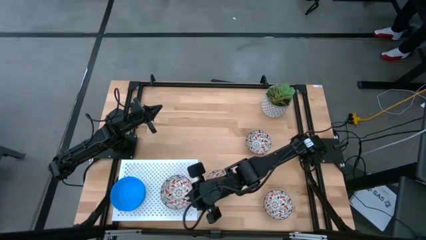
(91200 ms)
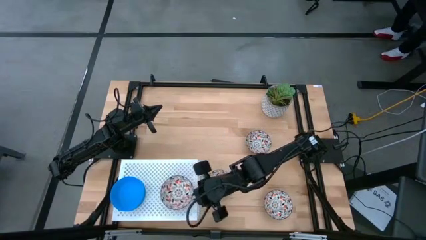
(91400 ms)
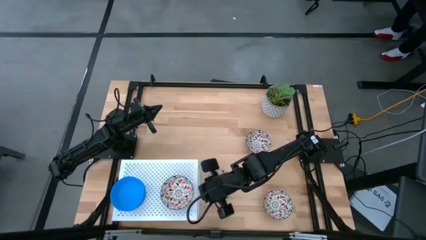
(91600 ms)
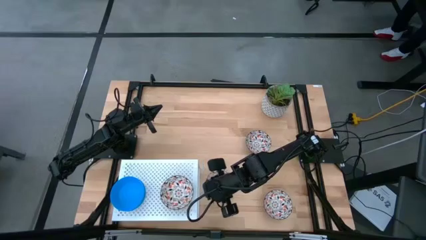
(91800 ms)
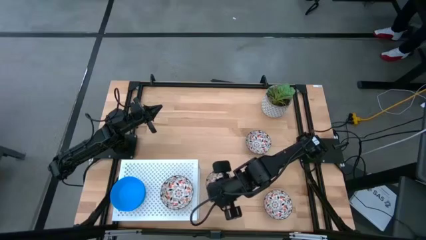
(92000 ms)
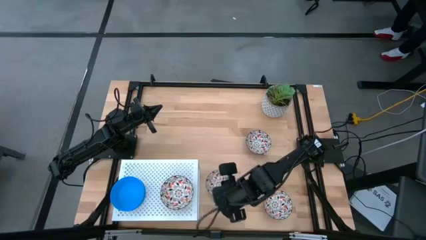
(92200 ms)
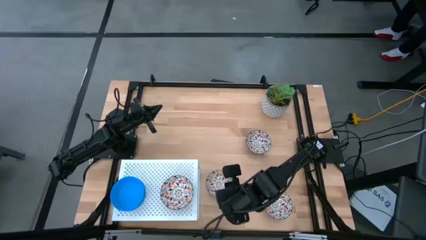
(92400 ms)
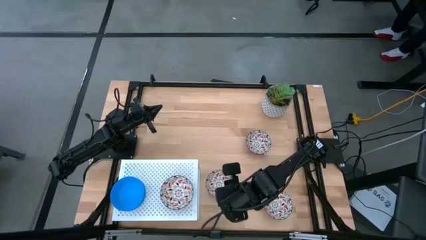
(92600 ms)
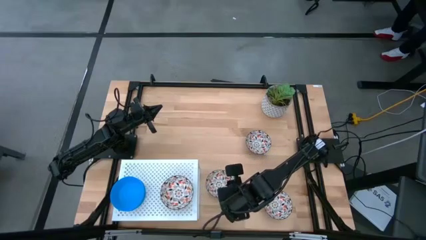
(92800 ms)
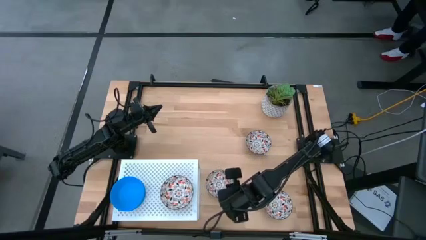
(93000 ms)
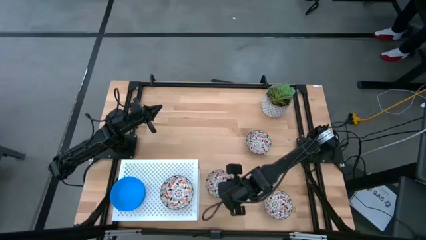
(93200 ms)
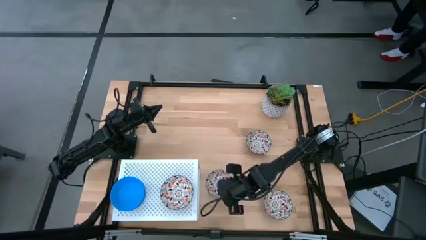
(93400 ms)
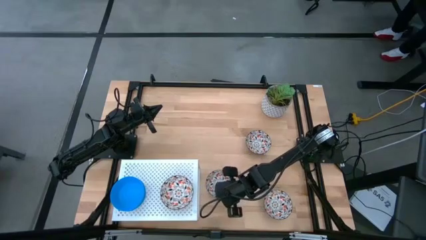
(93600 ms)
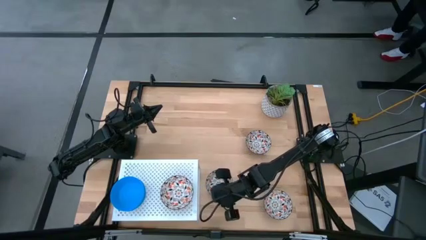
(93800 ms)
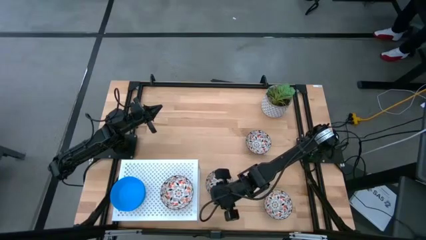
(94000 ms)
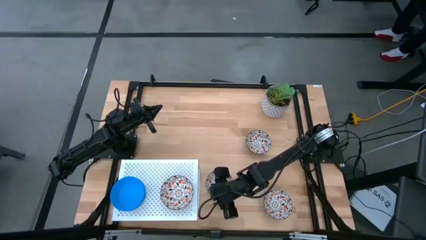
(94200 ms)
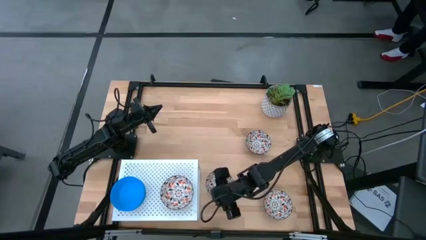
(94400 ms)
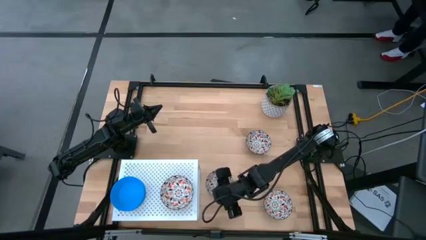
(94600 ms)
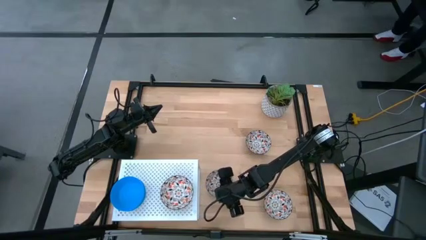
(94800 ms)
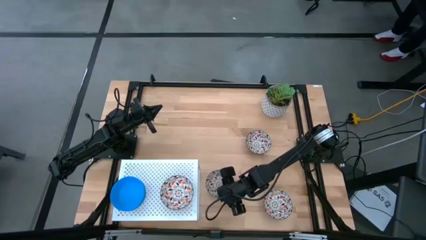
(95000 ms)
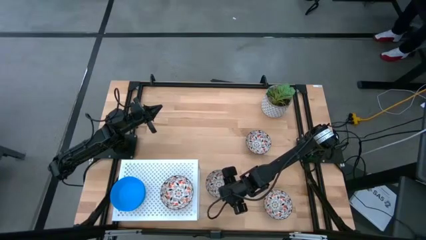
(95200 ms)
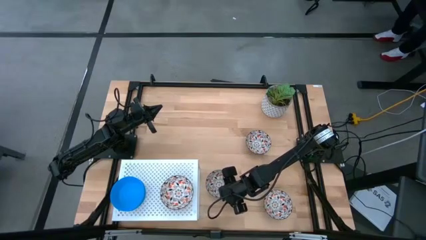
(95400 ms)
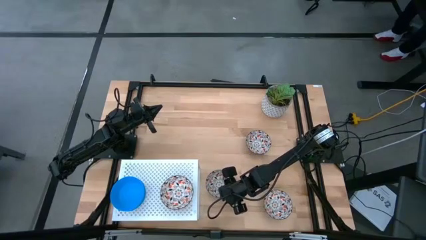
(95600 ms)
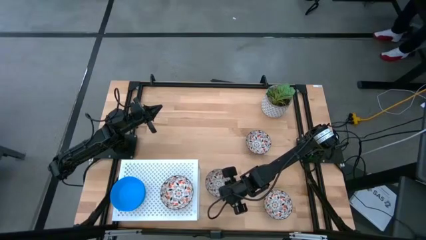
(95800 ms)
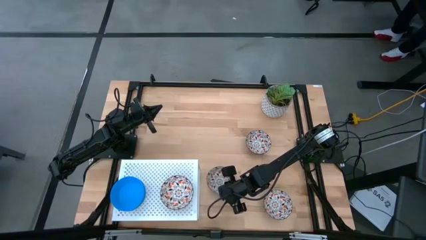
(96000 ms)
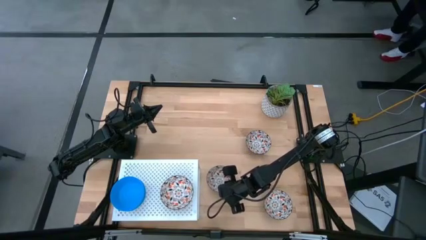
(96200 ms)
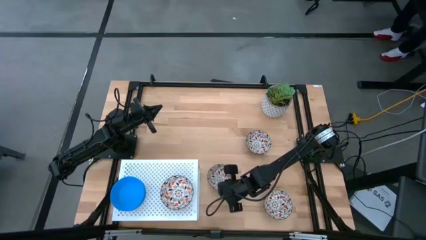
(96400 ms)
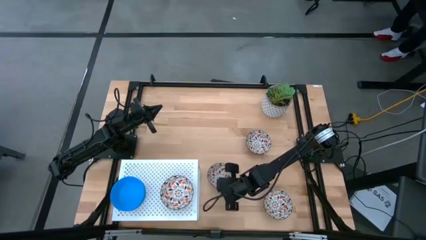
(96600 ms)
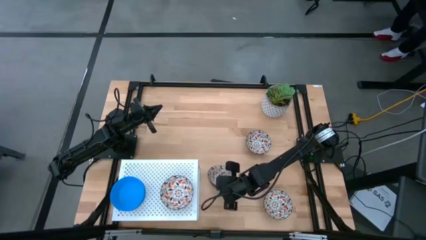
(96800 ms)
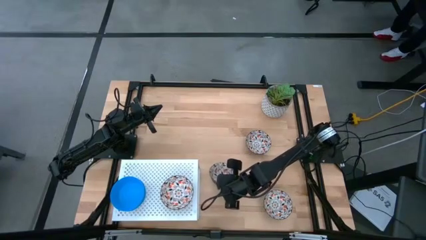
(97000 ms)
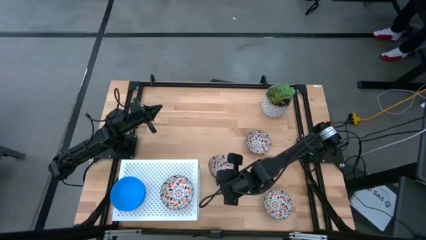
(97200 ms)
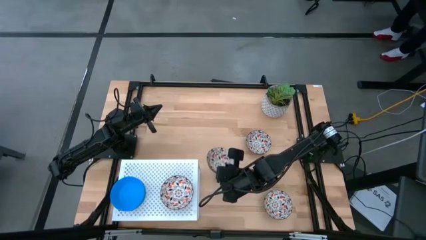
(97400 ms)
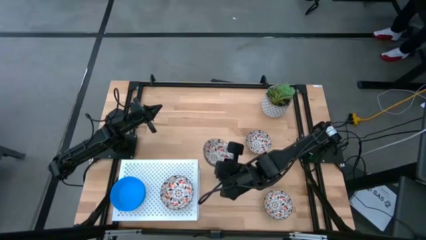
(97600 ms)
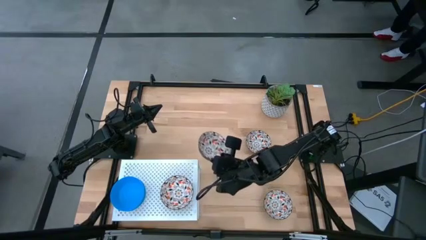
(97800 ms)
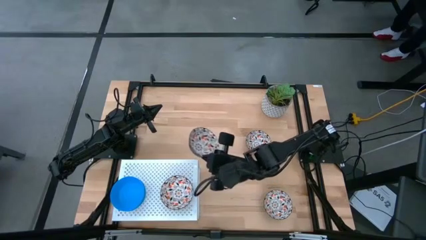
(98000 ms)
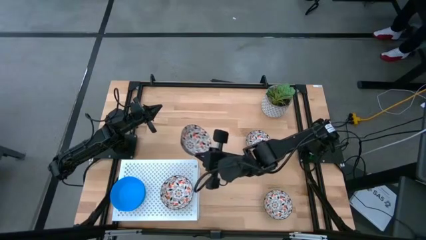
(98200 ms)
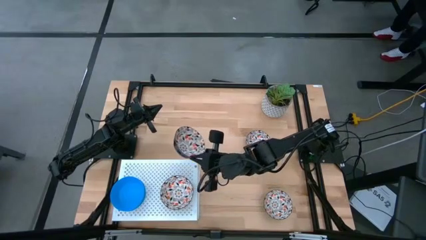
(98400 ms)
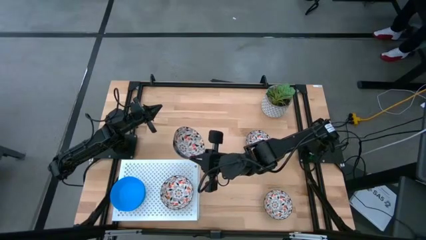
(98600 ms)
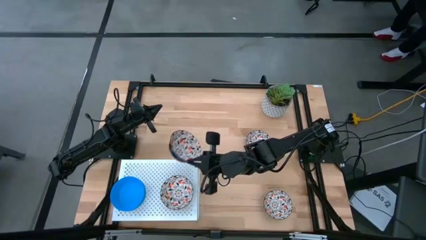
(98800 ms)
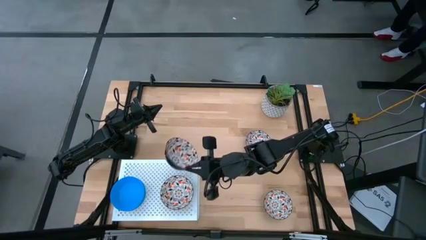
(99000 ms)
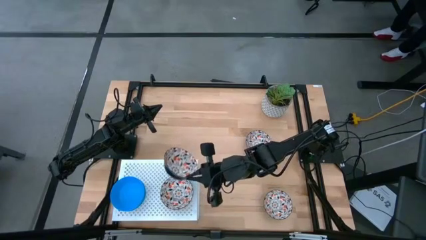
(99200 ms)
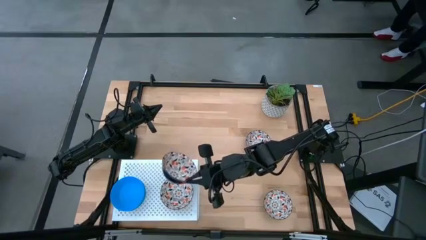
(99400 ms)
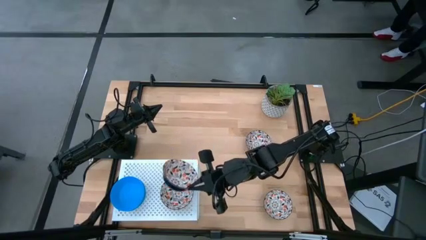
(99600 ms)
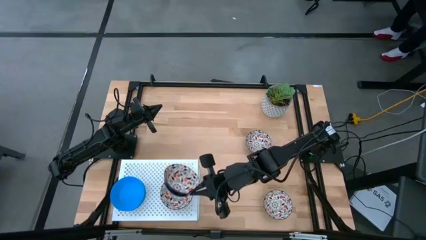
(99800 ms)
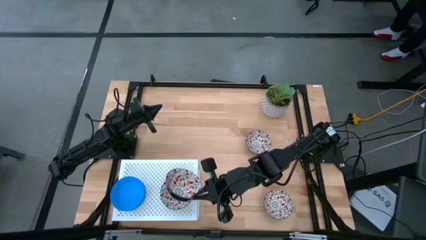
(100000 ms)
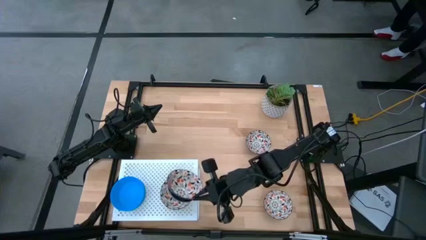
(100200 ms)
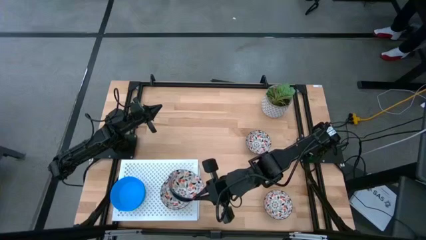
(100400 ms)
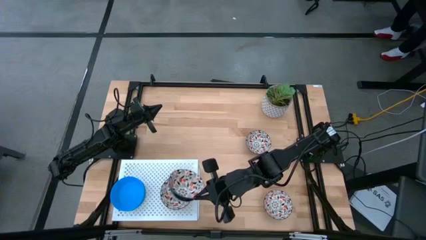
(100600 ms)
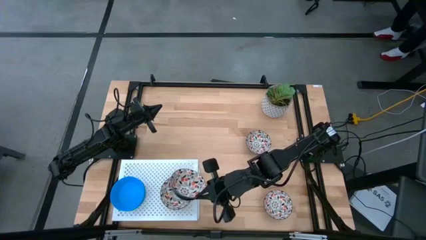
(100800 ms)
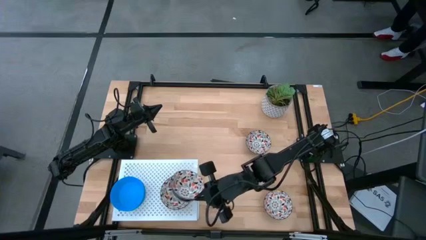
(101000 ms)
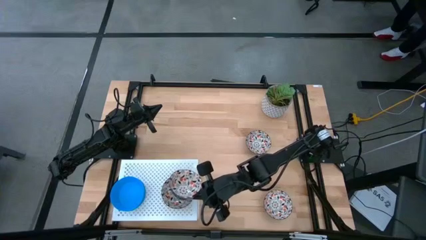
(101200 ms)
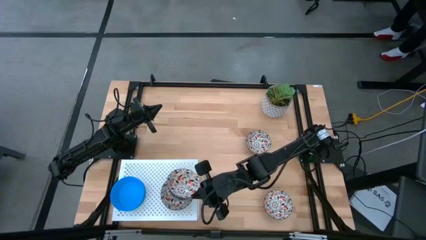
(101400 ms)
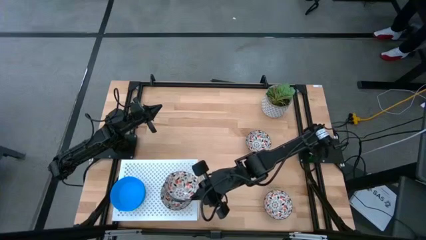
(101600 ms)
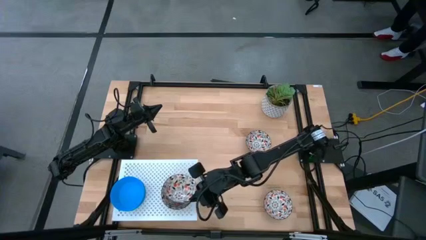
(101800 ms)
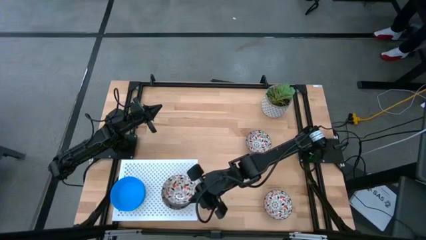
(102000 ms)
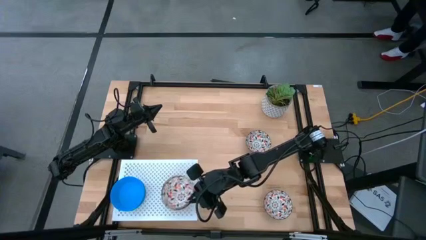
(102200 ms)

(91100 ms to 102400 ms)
Task: Pick & Place Mini bowls
Stack the patterned bowl on the patterned bowl on the shelf

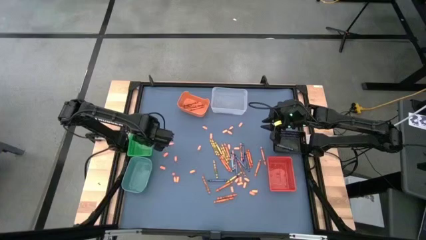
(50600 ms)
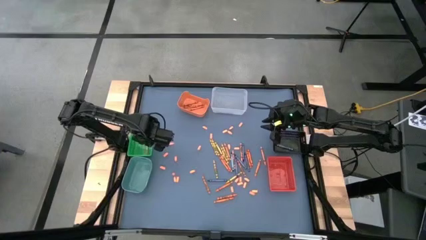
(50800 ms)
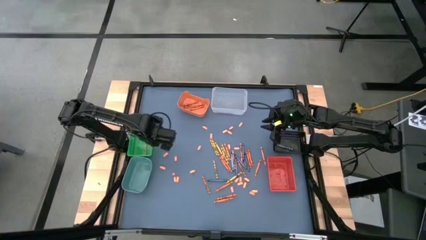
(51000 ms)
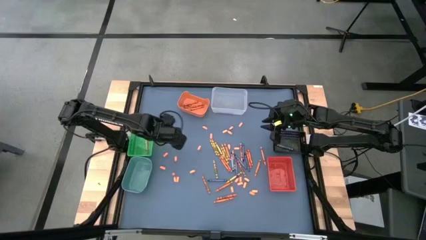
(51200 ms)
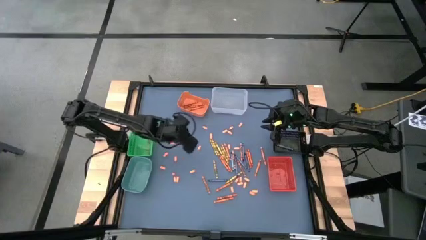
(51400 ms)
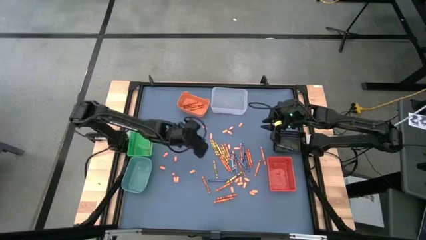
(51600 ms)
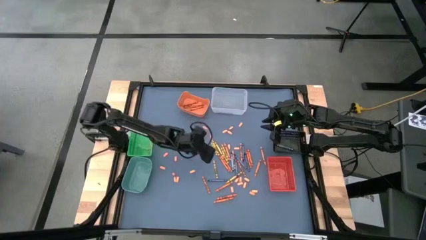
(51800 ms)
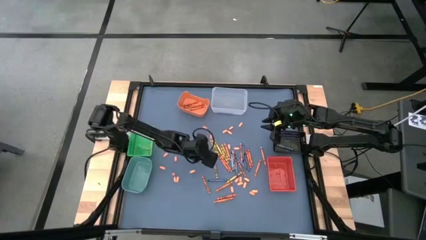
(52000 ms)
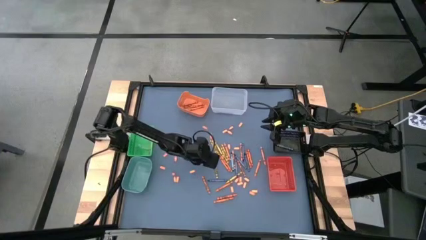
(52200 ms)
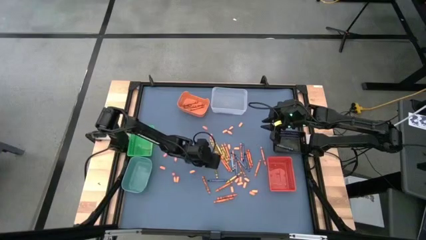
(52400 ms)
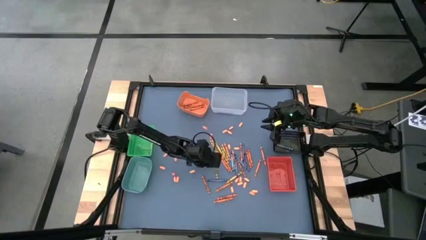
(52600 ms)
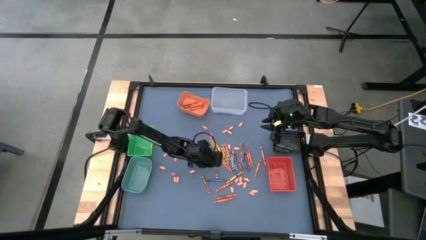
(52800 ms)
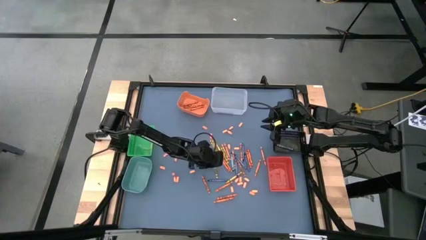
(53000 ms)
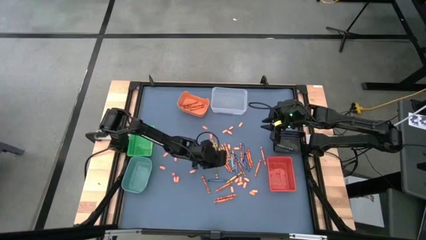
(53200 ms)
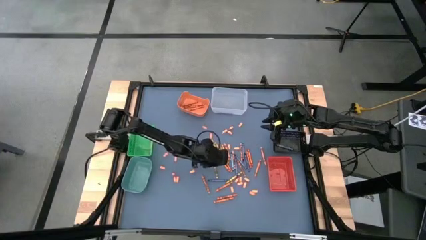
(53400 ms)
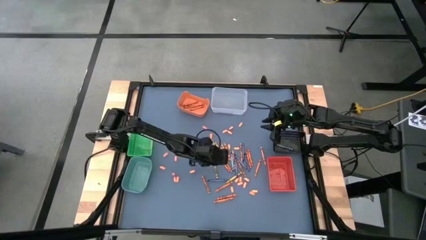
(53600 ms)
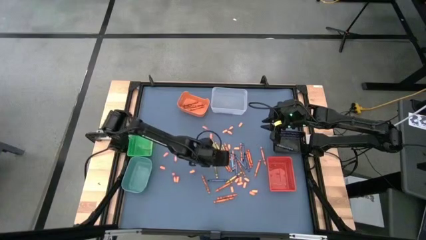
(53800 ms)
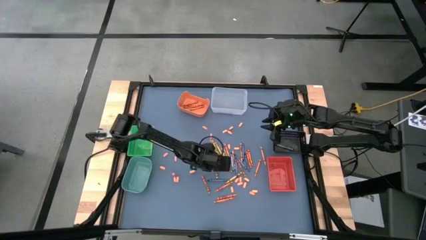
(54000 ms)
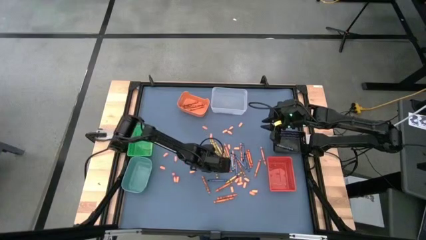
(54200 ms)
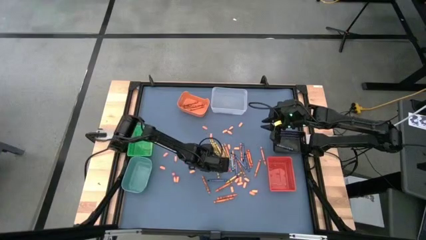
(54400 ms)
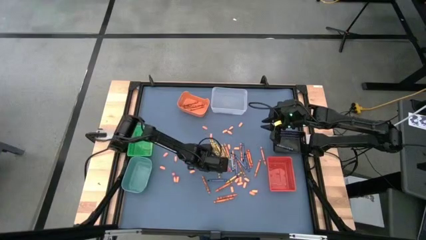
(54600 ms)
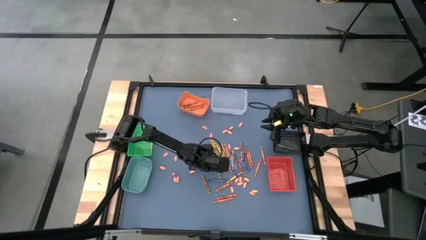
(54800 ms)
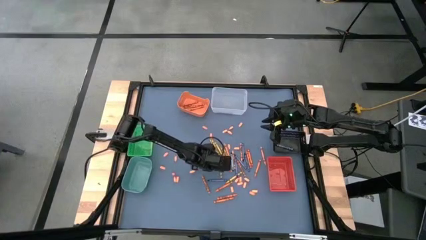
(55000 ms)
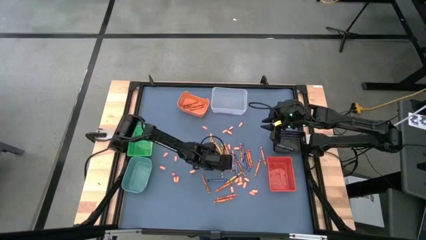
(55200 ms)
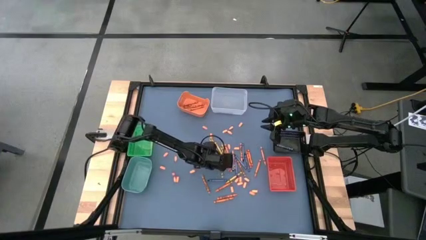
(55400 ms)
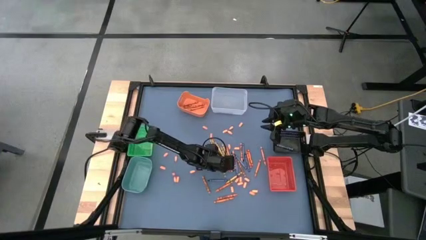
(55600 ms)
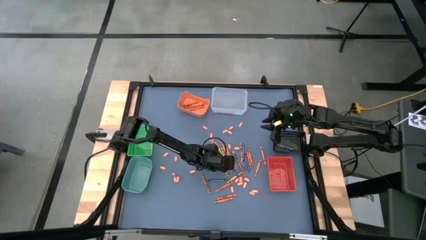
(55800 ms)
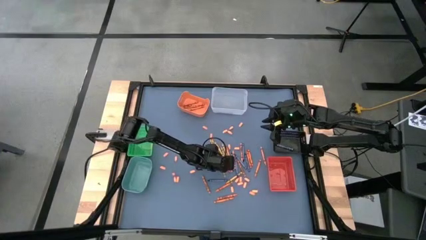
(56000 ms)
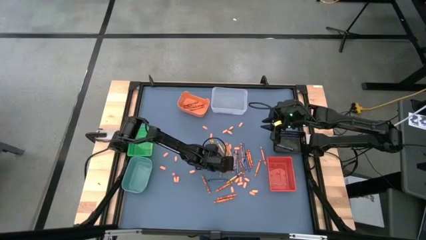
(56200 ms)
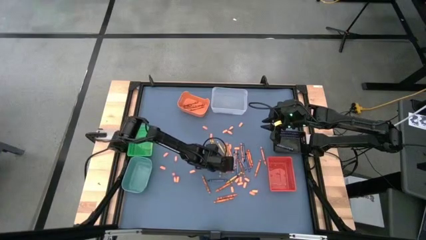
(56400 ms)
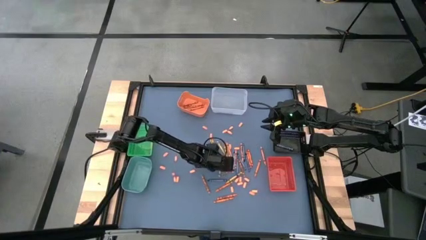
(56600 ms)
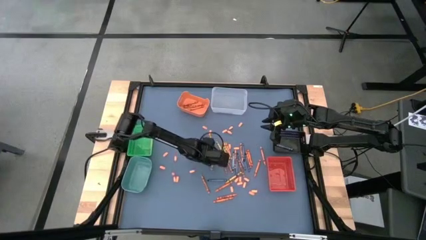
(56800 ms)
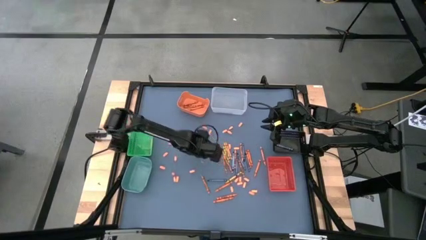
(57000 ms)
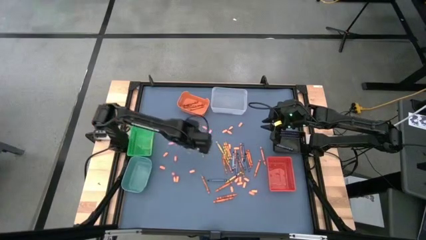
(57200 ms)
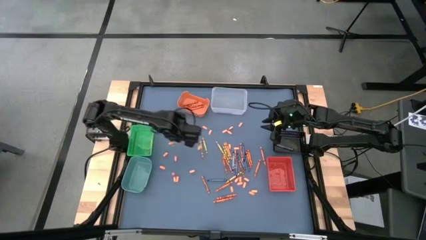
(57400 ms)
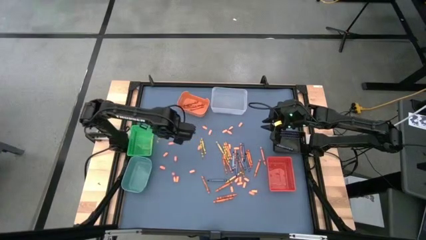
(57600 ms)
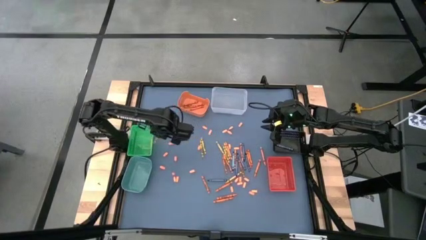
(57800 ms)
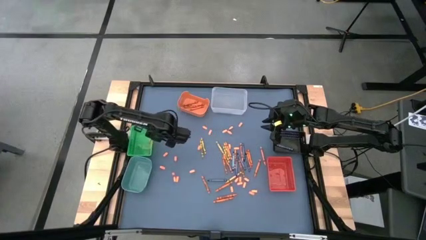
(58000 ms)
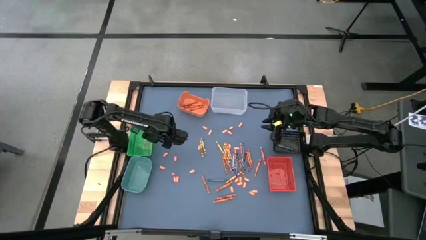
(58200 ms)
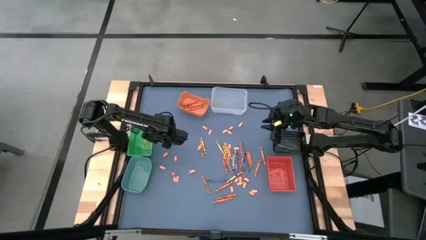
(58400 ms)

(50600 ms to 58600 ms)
Task: Sort crayons
Put the yellow crayon into the green bin
